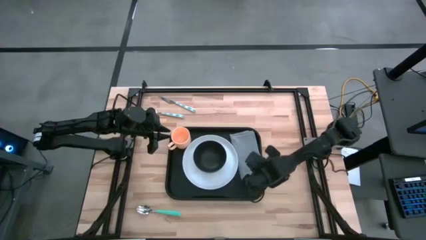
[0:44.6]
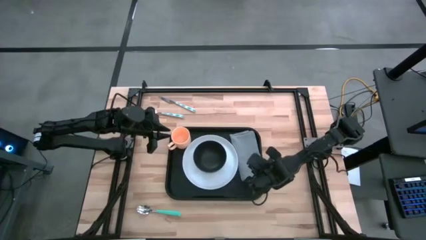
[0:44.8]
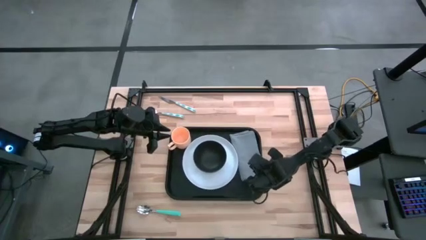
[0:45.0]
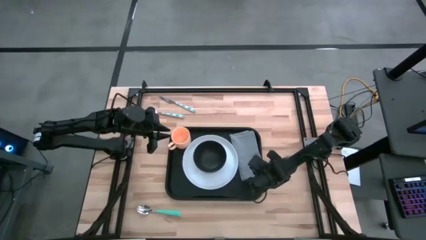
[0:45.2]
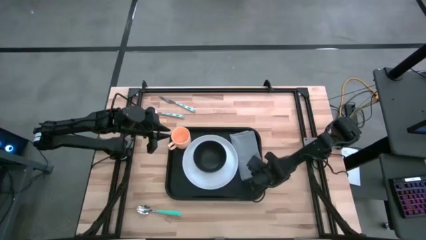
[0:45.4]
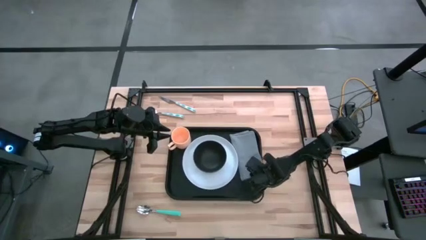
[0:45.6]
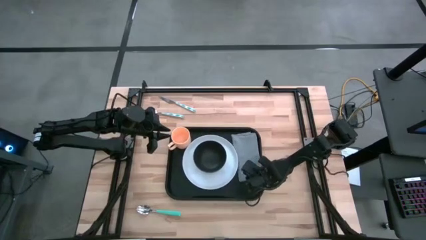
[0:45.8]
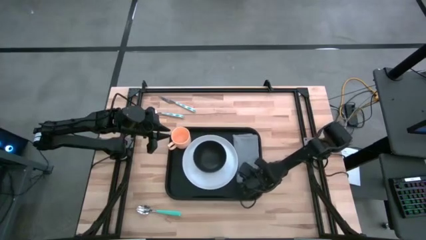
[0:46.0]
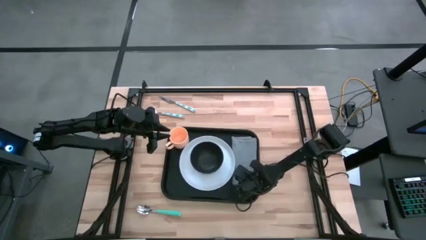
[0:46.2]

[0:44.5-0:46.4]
Task: Set up tray
Adjust the gray napkin on the black serving tray

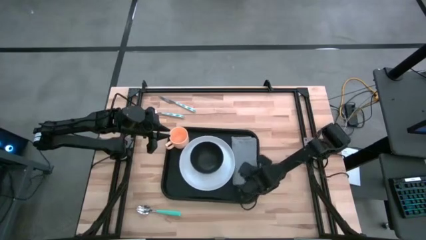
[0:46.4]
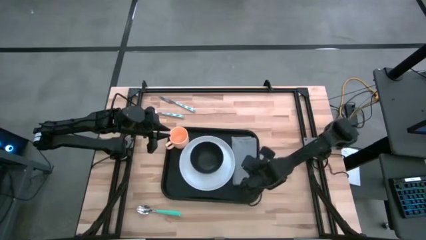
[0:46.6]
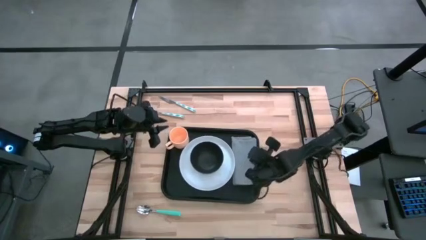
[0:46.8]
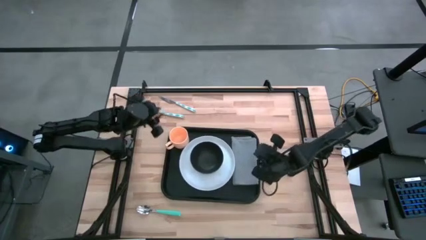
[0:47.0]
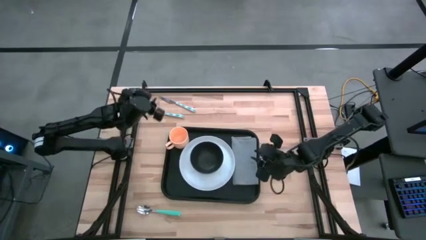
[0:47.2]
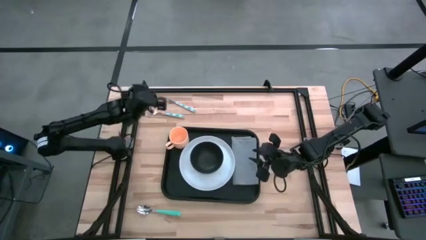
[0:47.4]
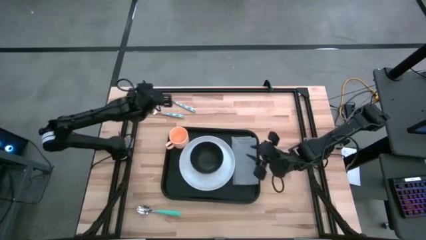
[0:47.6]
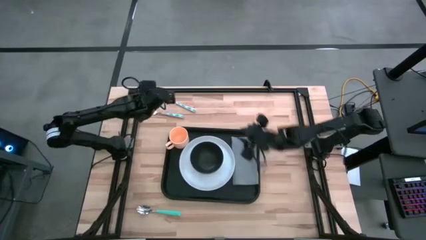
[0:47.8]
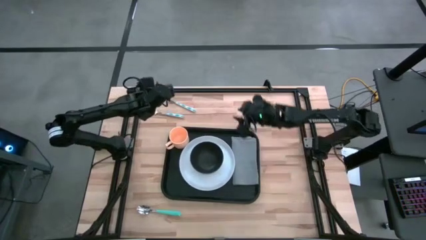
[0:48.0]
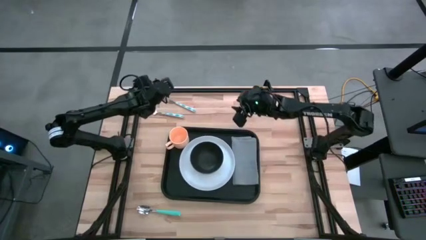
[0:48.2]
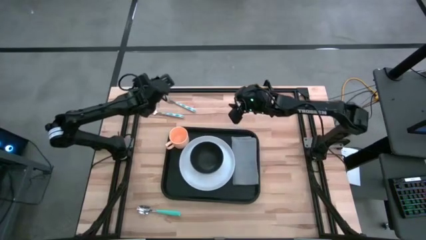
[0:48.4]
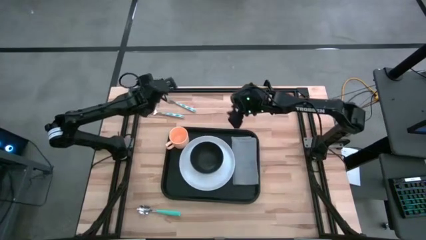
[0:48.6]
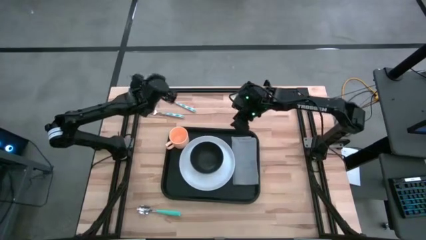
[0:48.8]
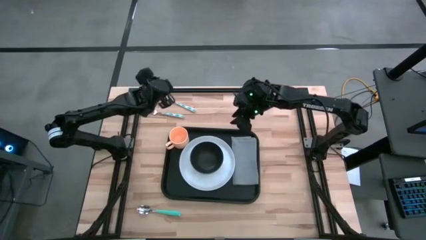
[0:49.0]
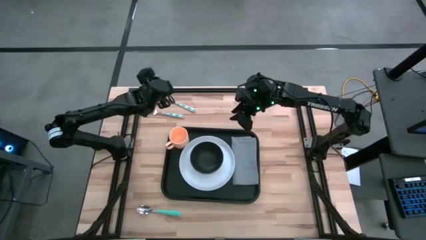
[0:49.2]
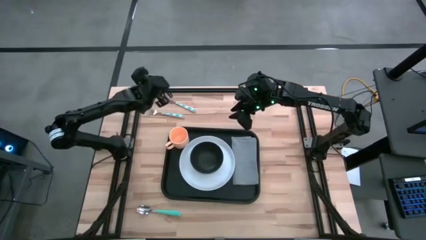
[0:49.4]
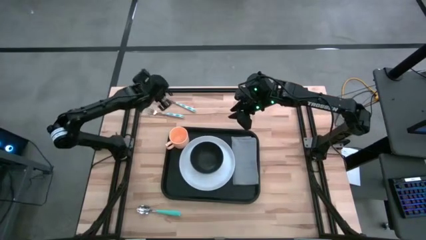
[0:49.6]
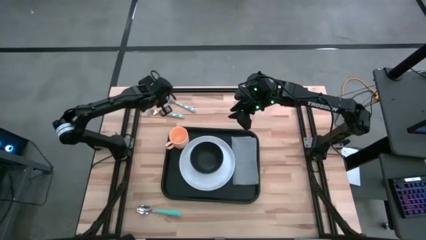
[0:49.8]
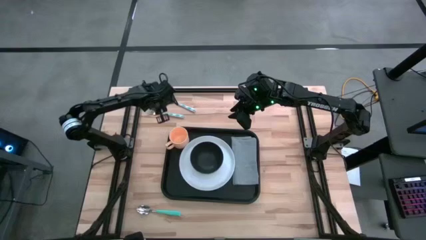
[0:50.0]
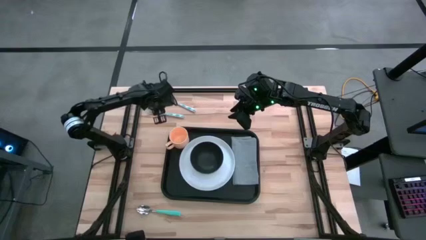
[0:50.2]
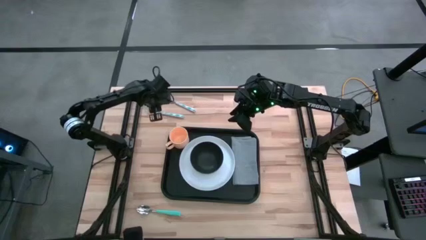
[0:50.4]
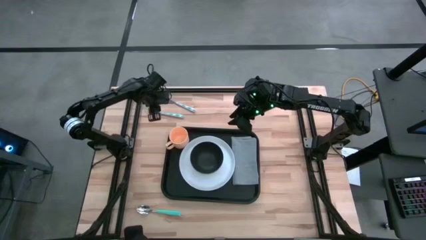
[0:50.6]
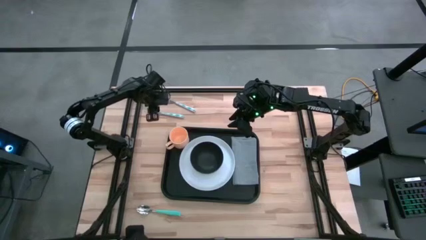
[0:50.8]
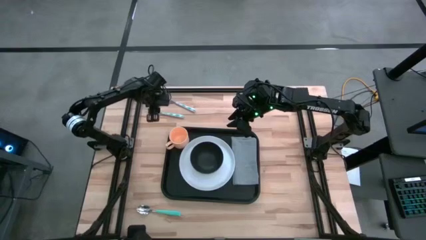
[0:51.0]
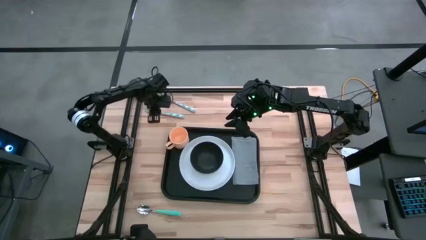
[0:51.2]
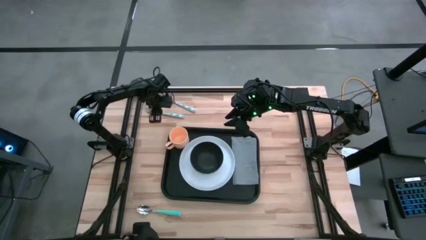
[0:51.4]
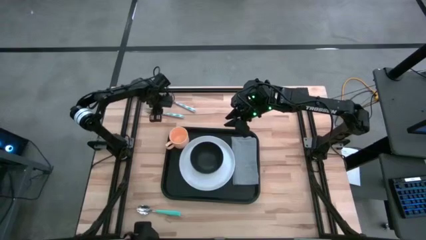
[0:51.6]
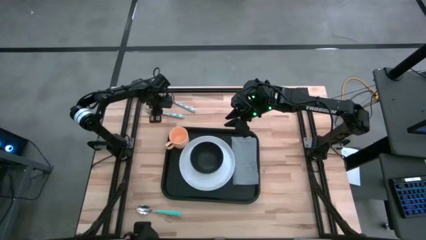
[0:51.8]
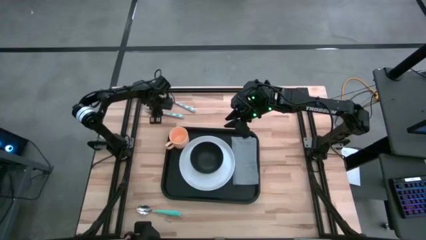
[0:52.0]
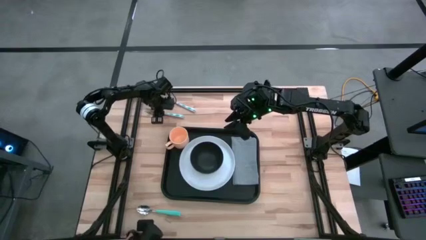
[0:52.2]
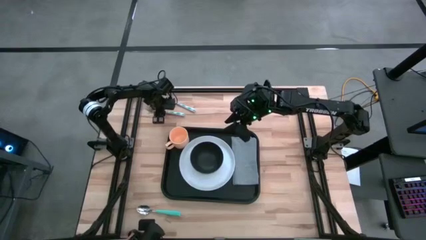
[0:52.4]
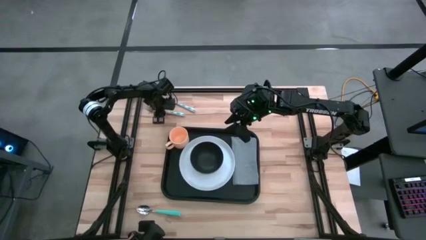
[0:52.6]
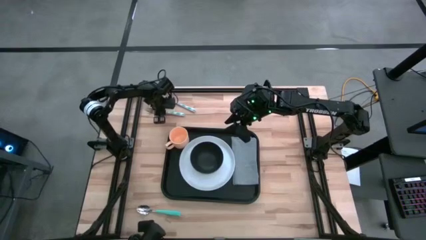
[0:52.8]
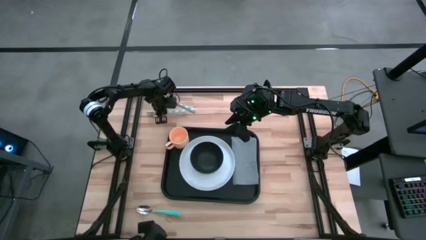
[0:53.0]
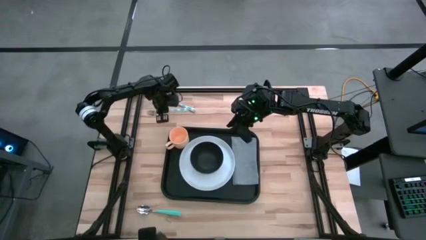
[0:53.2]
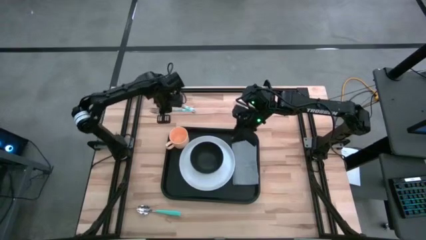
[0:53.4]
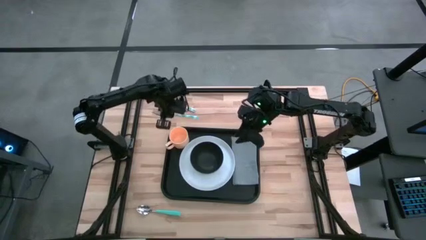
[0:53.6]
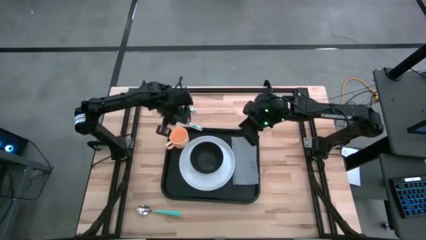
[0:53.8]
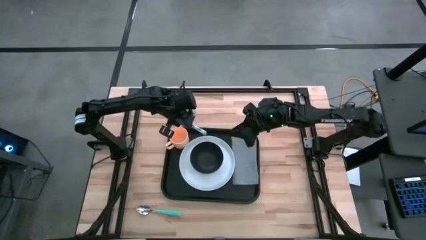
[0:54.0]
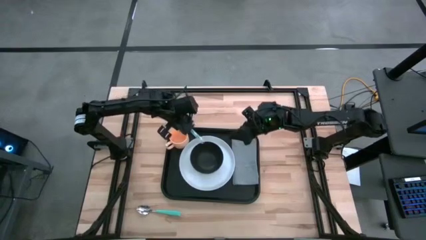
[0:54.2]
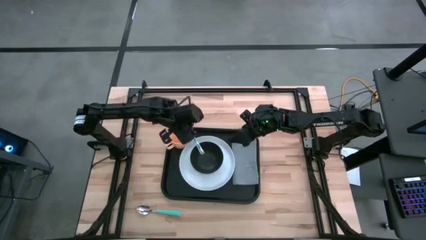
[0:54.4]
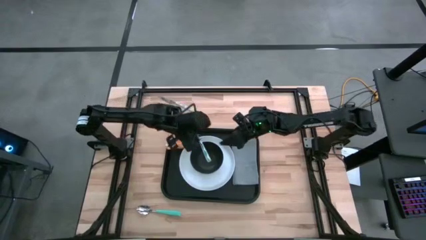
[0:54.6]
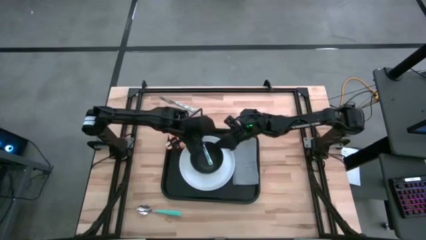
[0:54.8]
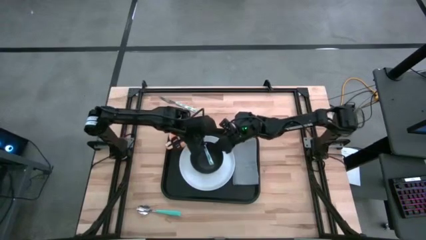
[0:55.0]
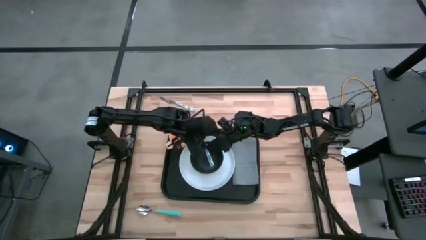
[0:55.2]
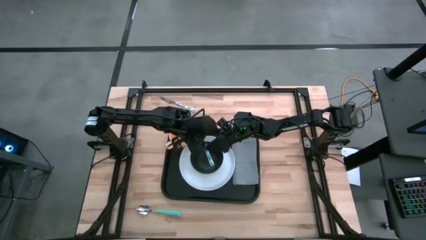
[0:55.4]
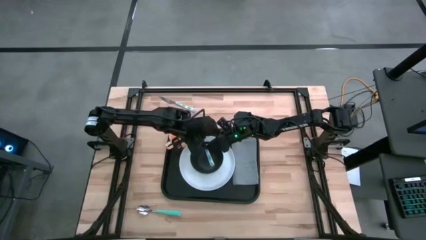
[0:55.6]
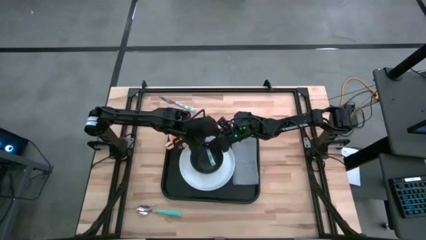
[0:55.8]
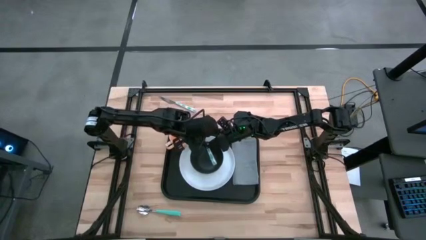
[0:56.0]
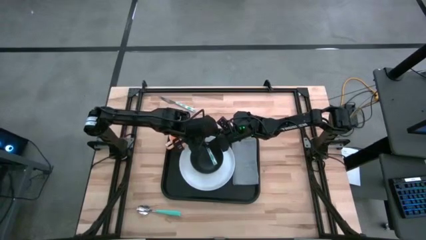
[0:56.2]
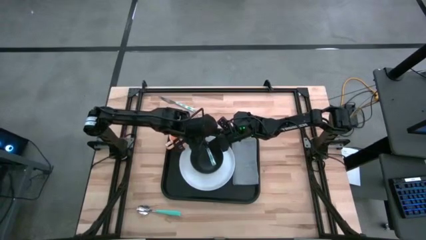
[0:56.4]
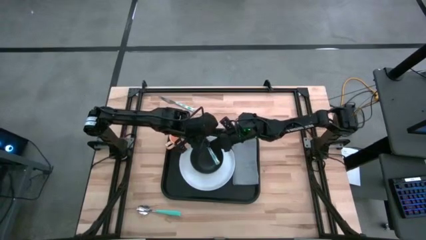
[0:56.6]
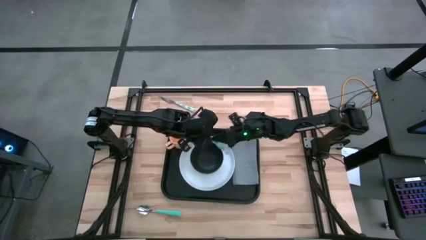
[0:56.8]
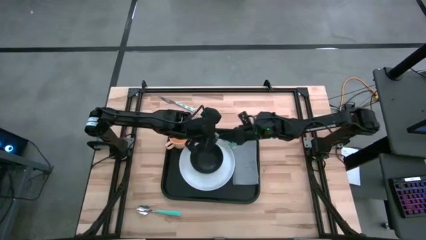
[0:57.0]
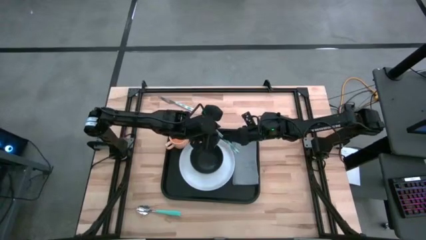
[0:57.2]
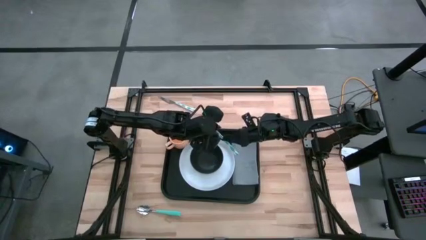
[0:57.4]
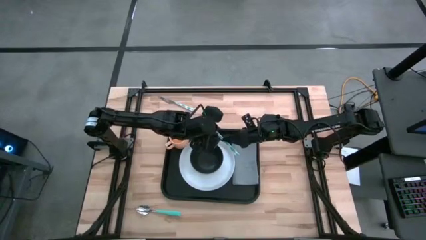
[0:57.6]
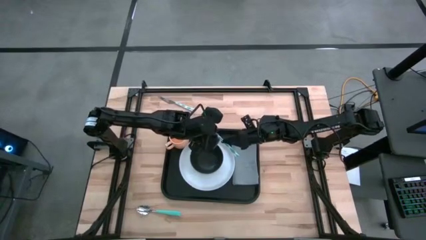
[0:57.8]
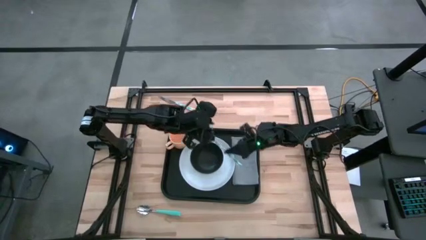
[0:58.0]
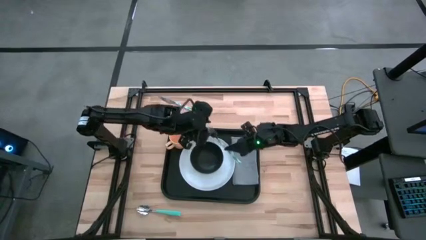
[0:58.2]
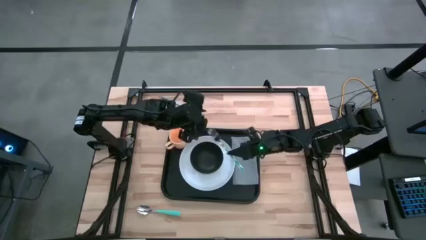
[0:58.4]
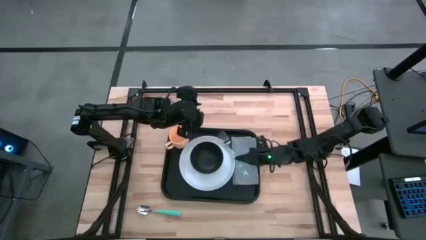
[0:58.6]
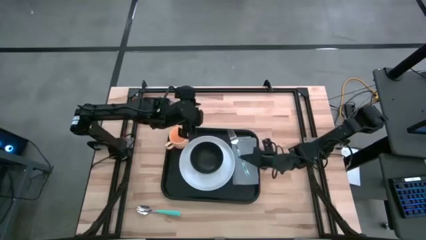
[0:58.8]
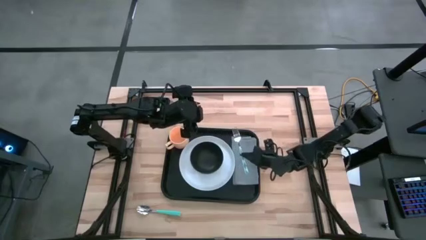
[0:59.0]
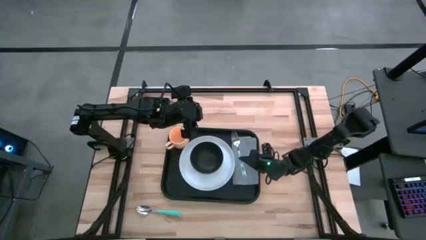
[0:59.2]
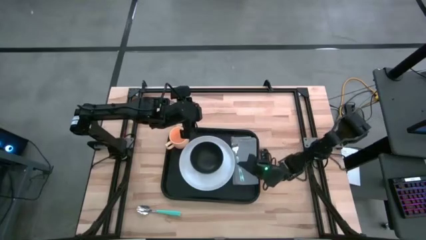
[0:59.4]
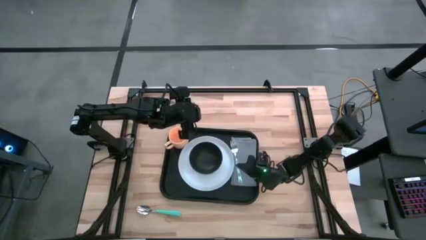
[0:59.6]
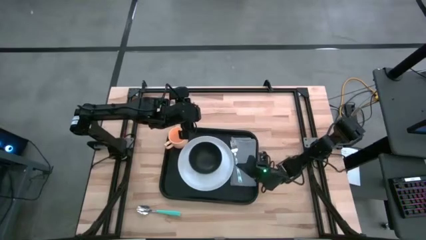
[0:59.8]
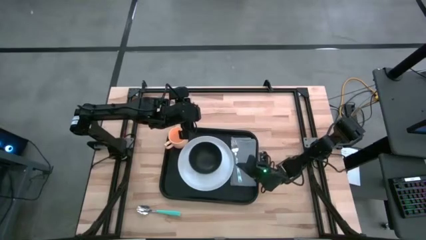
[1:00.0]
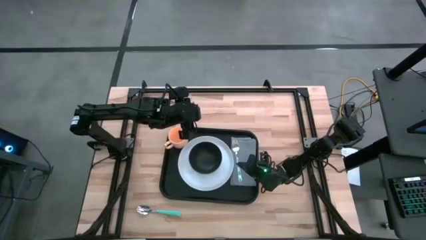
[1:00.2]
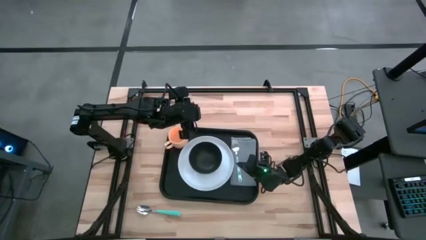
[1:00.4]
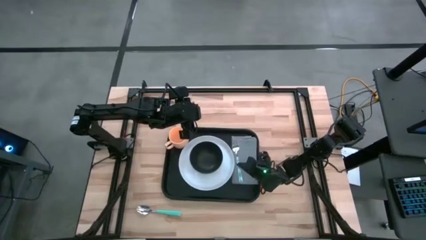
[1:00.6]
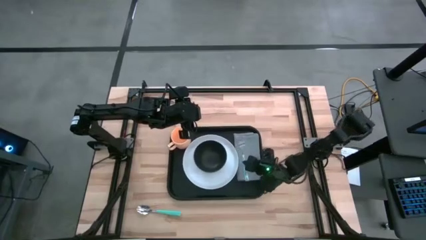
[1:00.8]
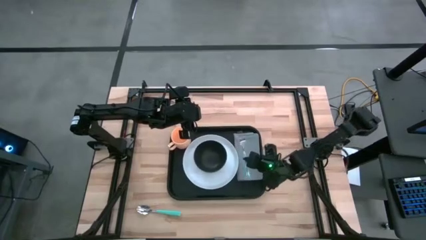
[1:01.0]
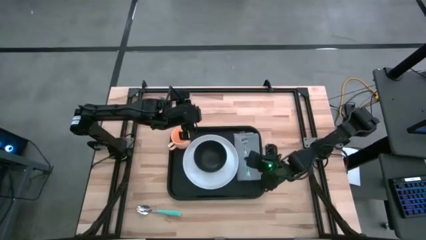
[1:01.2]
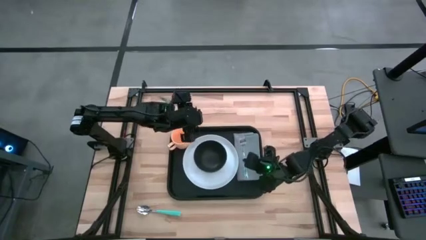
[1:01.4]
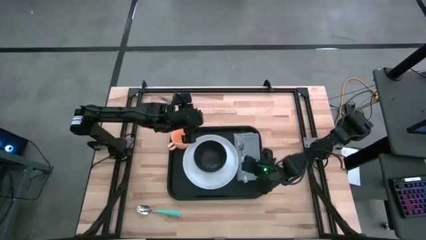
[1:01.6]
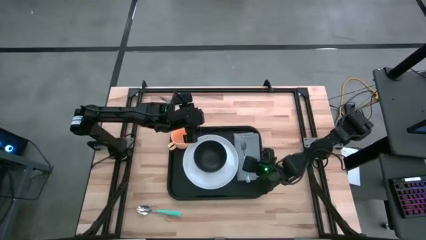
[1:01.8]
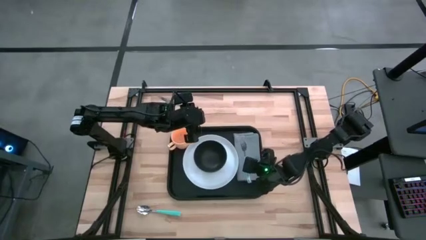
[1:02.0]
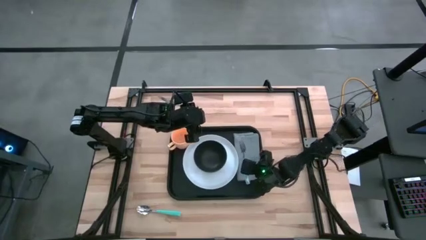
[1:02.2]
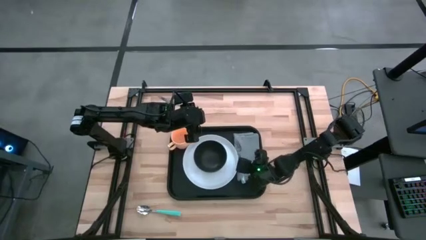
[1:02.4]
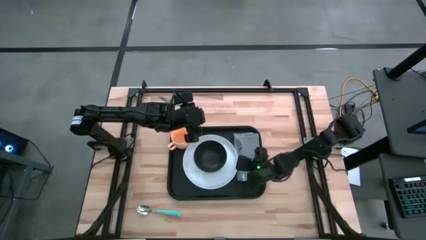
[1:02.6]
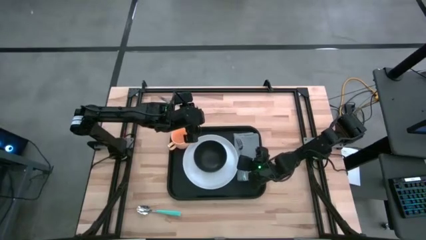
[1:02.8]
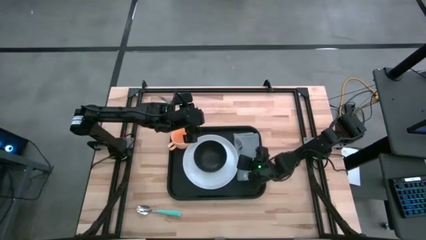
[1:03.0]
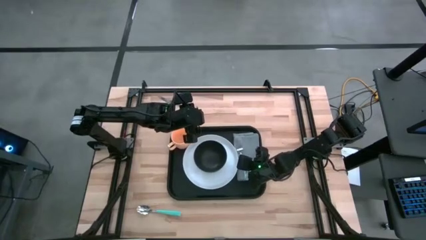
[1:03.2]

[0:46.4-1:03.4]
Put the white blue fork on top of the gray table napkin
